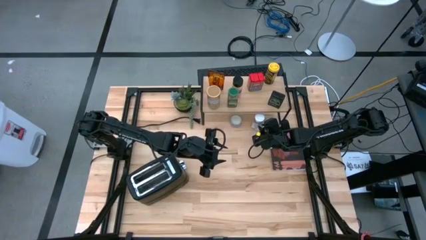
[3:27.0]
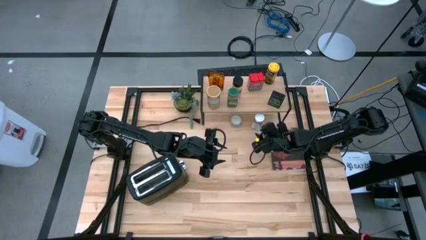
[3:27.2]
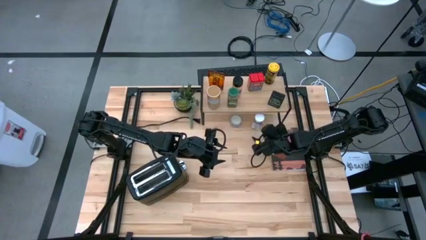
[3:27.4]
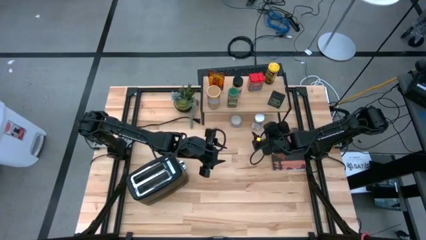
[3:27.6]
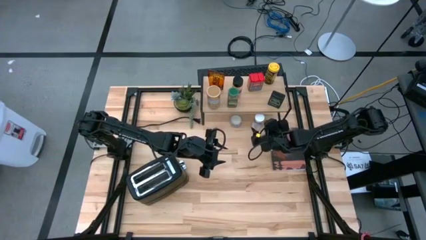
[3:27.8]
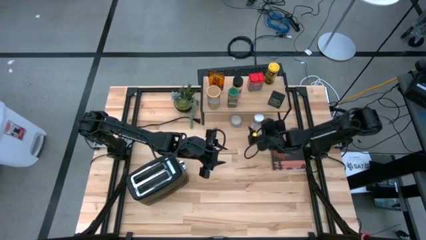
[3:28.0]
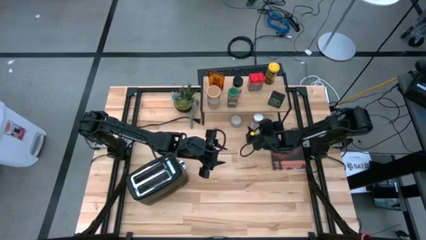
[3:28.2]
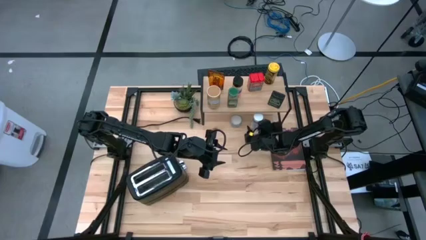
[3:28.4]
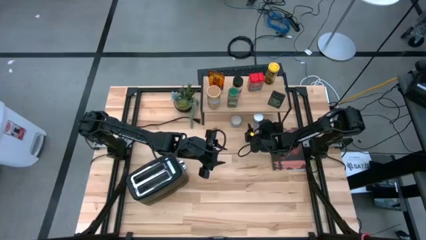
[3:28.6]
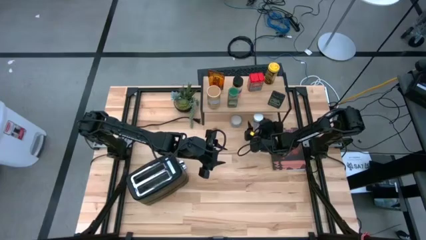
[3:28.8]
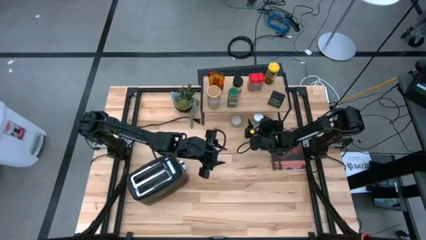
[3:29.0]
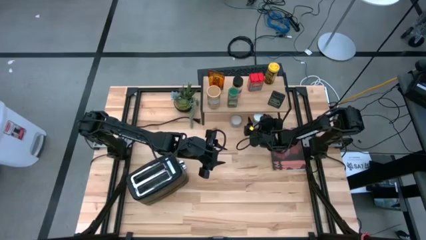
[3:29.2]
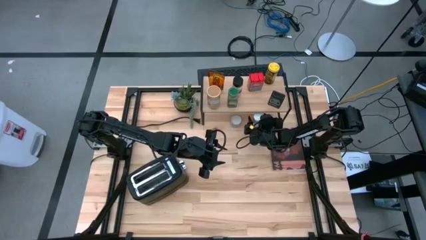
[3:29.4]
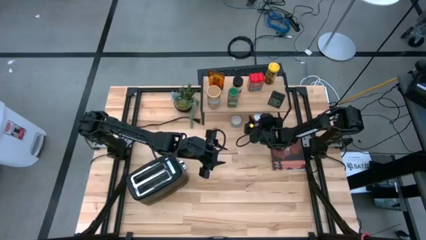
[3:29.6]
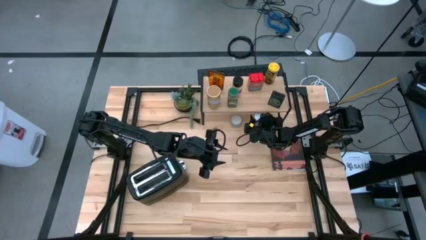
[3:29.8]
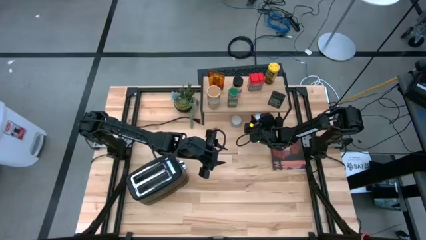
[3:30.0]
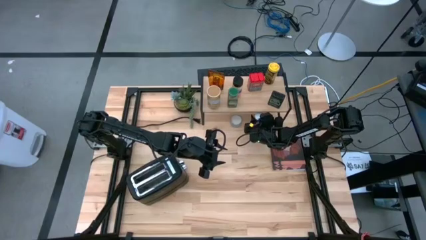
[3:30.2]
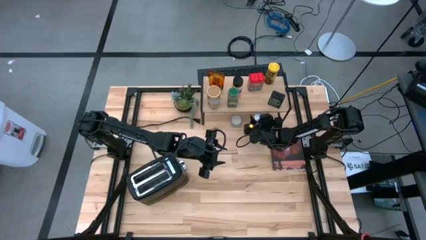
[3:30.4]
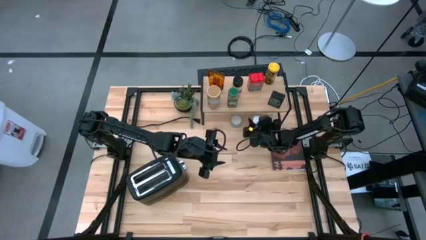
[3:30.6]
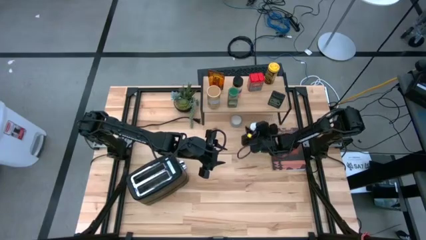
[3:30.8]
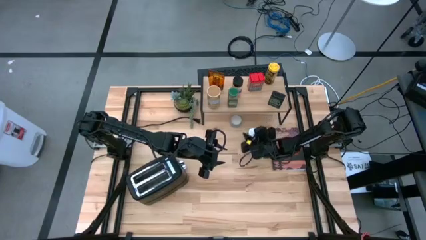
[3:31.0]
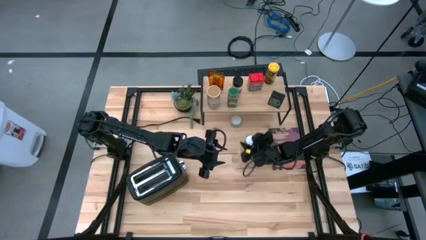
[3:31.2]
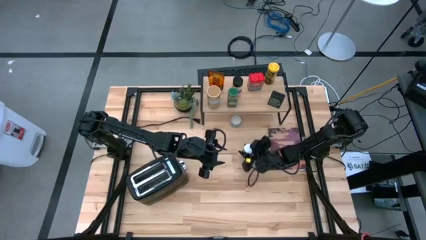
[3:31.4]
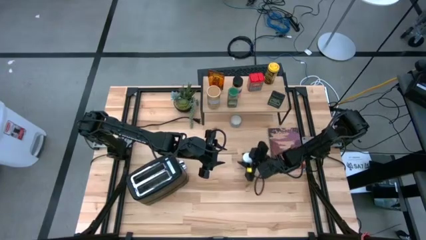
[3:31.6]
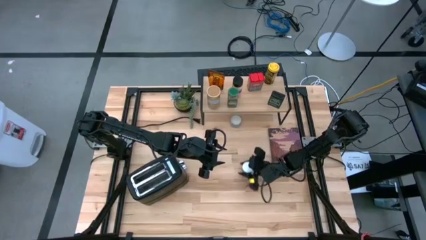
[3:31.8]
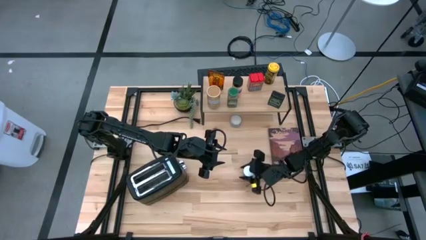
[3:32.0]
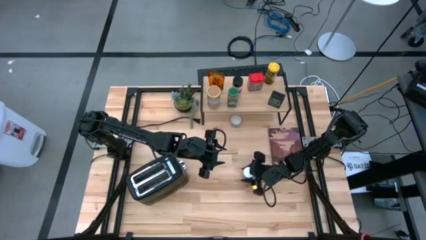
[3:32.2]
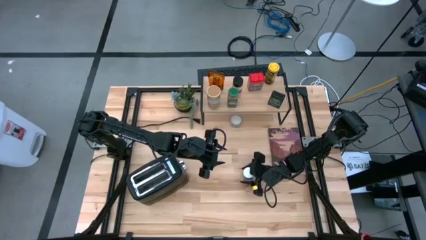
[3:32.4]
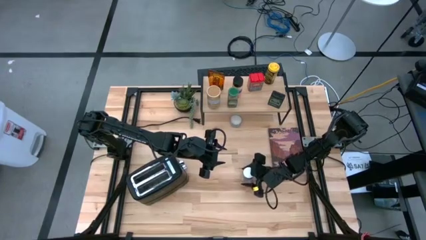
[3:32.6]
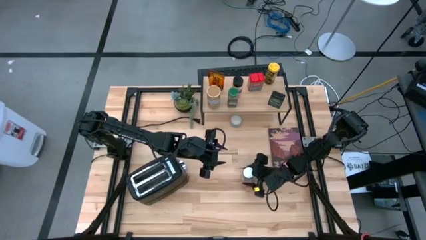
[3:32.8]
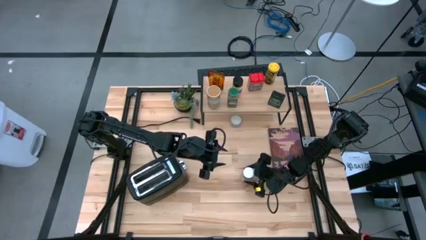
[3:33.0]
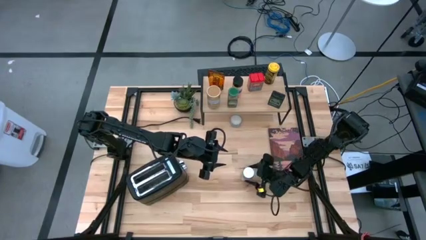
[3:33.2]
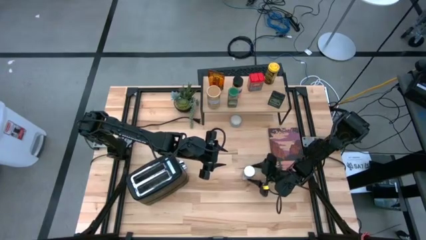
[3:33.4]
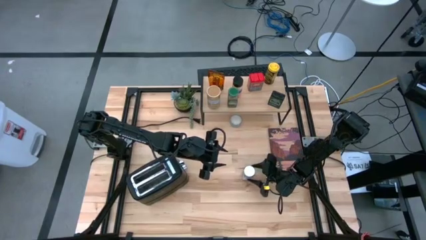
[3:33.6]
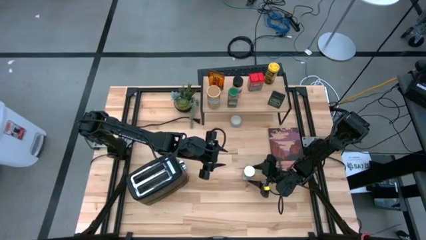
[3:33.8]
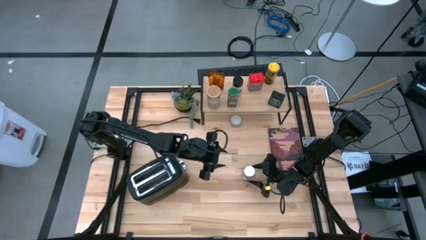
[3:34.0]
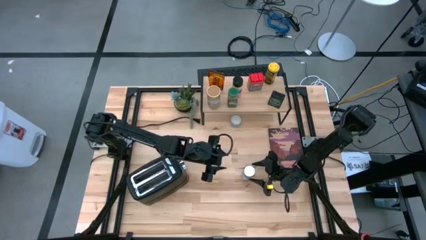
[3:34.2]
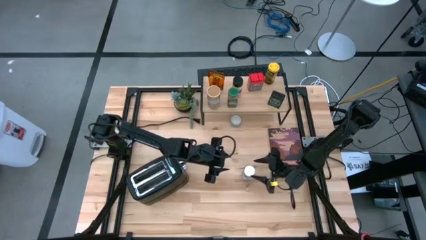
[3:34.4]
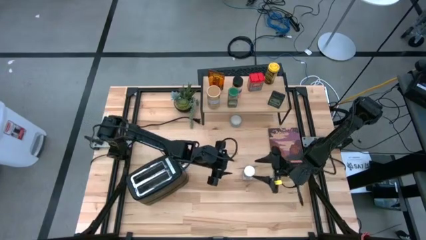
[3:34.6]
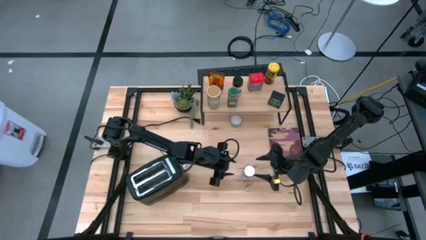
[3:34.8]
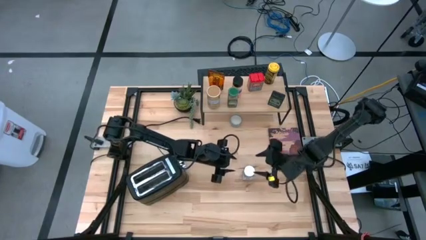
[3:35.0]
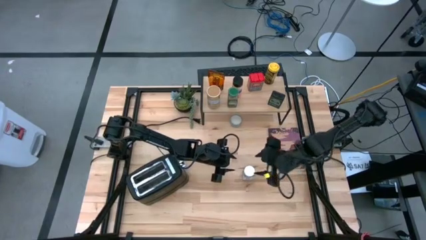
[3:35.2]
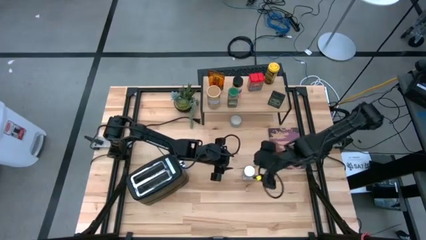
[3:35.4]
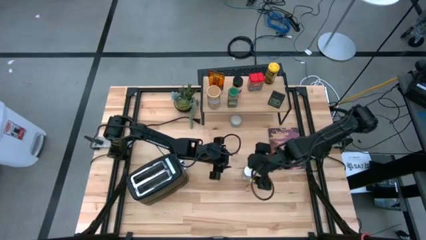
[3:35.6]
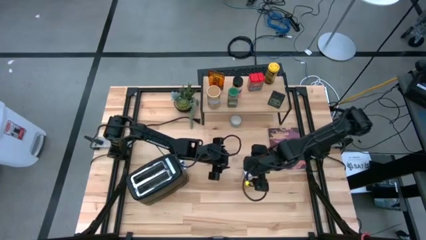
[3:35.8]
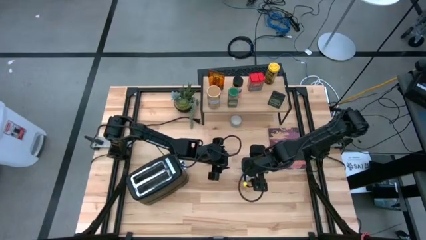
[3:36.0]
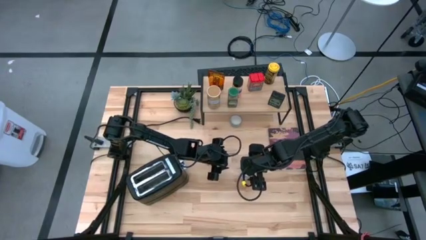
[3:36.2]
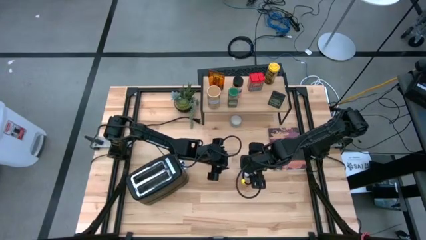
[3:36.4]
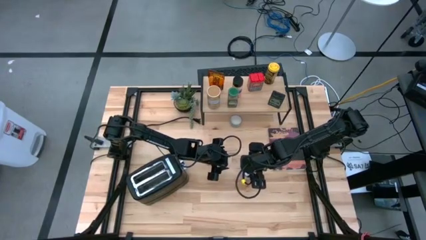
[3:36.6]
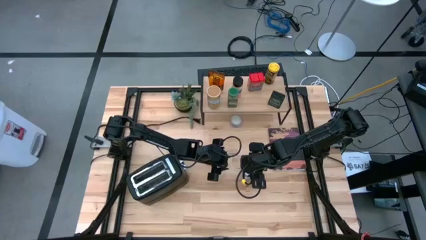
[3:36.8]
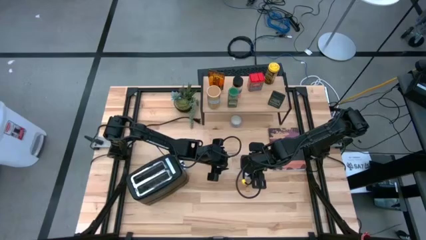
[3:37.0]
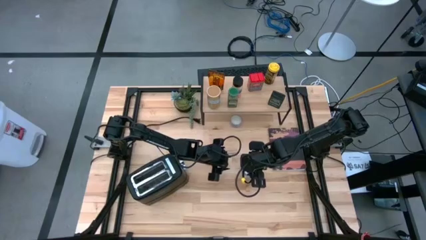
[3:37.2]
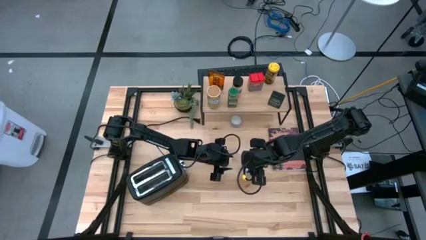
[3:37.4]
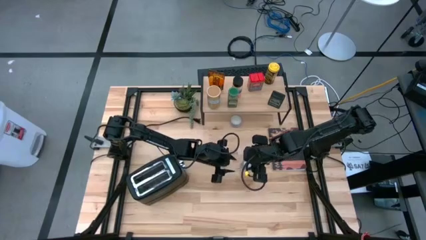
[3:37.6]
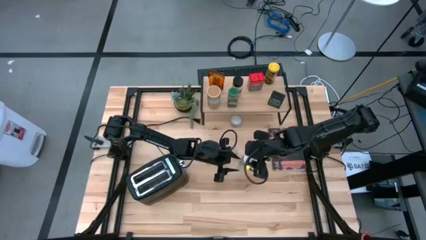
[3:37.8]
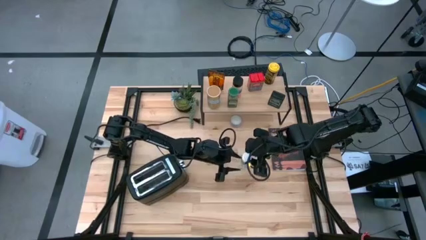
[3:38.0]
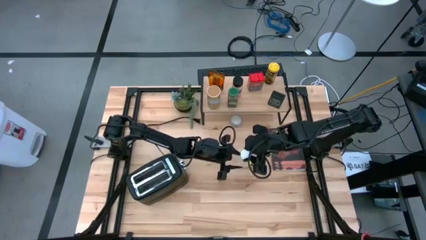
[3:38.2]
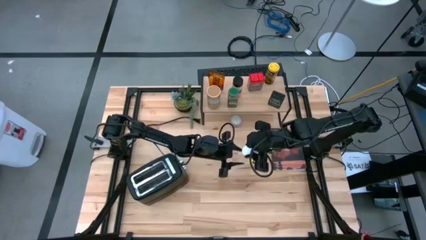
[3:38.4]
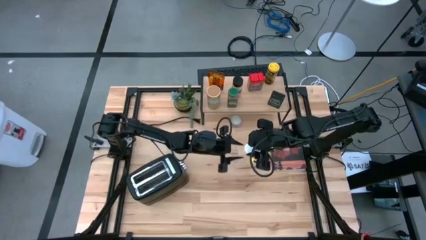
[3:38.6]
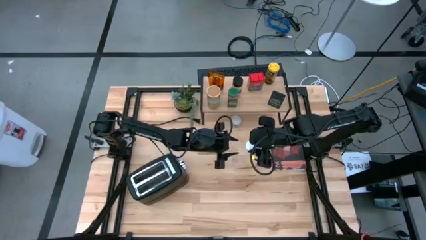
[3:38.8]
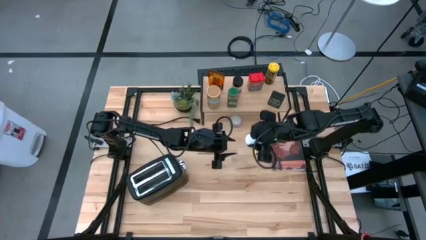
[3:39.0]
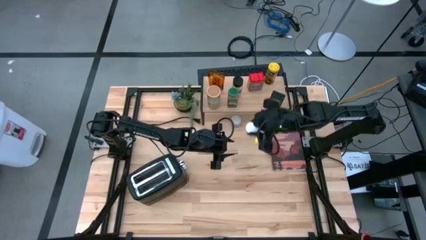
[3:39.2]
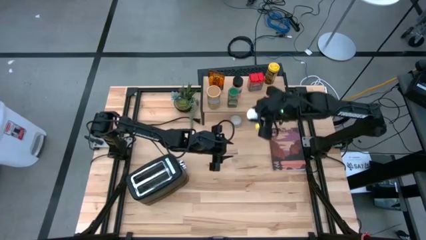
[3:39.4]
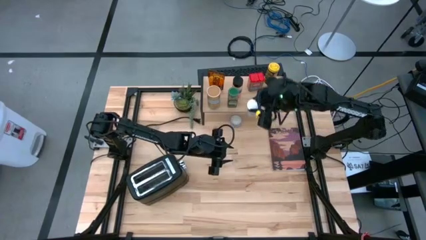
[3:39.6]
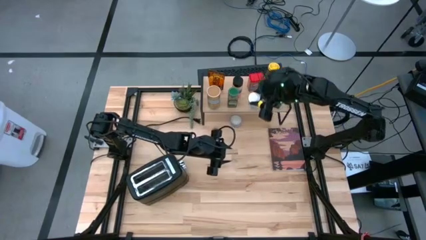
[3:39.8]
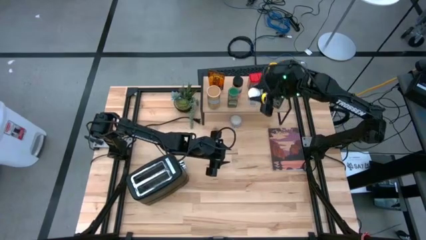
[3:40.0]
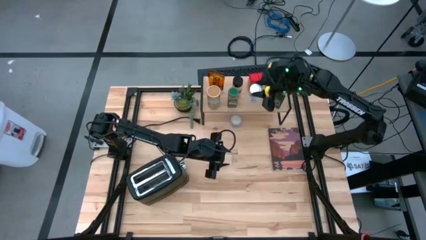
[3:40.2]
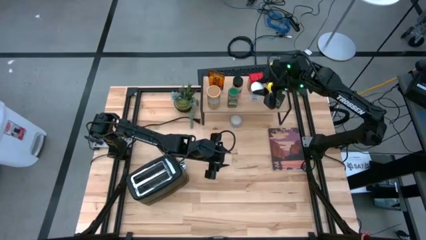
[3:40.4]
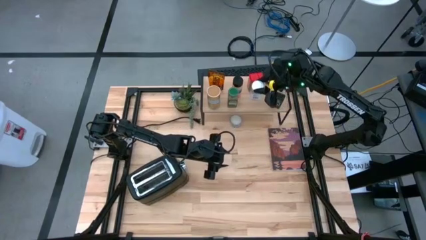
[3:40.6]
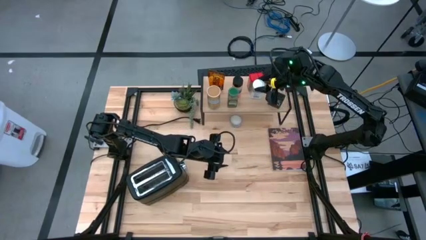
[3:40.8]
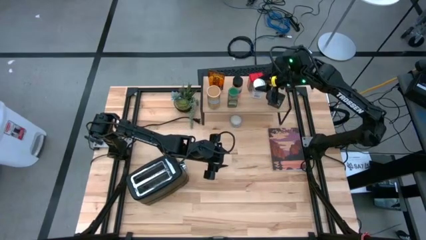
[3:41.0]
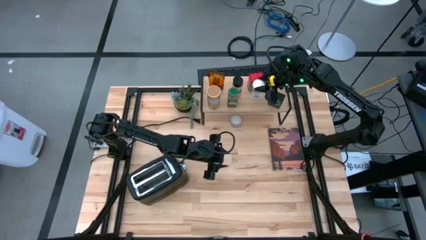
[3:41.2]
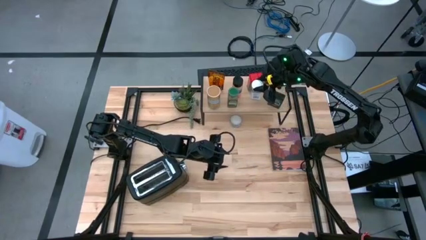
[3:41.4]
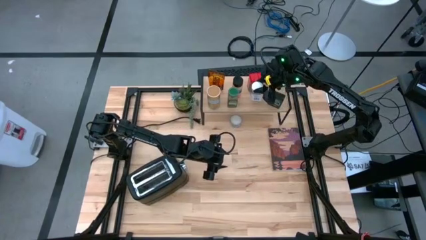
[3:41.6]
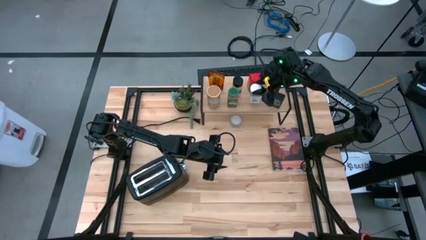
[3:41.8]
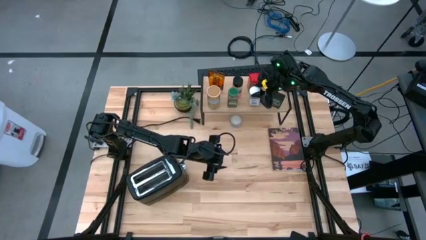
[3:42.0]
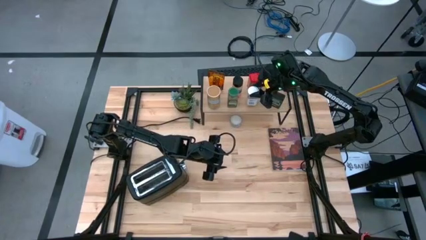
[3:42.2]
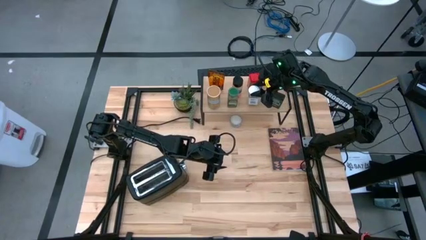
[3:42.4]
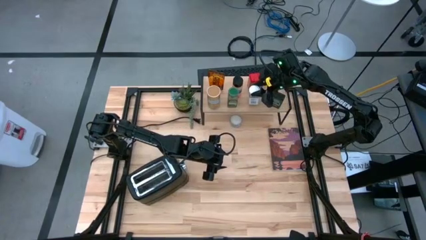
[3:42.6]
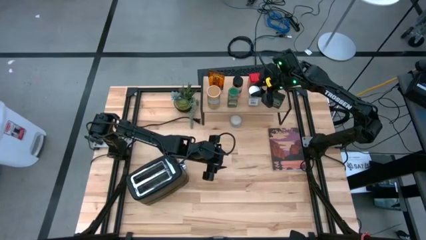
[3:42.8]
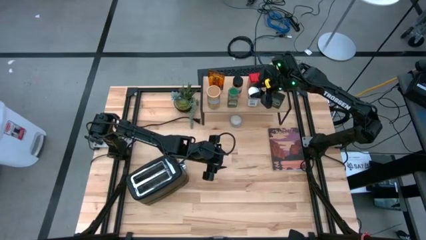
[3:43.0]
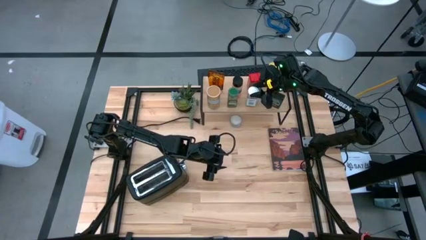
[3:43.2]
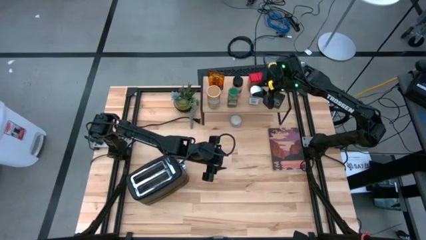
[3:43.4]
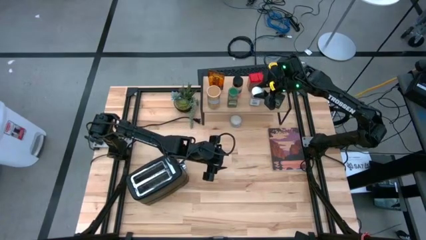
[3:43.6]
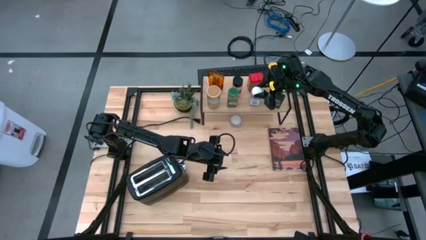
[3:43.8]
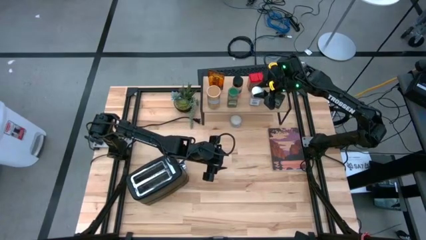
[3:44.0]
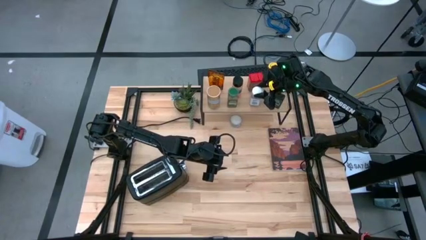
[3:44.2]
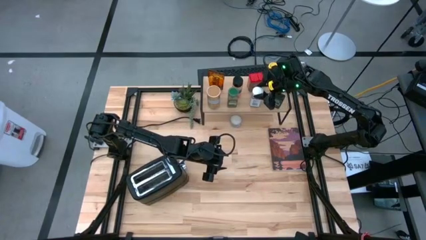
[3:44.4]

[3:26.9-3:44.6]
Task: Shelf spices
Put the white seasoning bottle on the shelf
